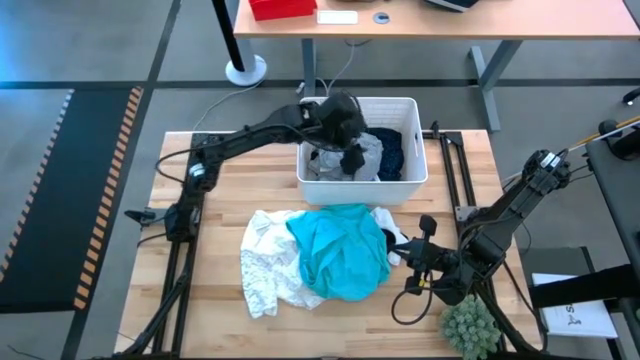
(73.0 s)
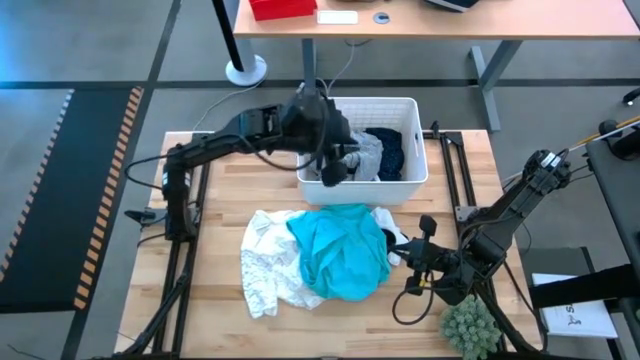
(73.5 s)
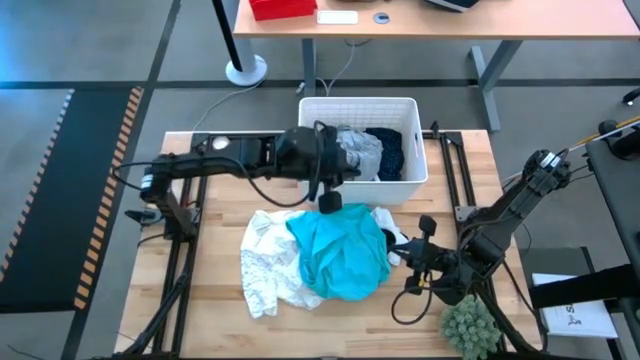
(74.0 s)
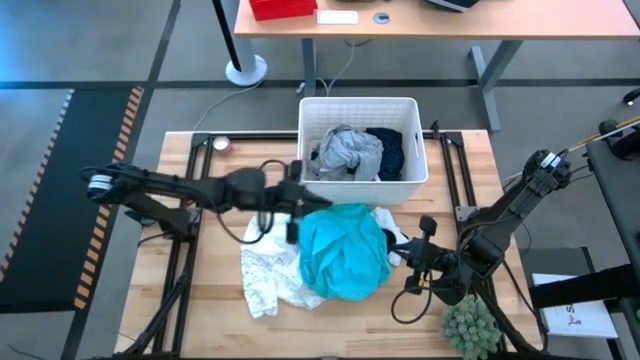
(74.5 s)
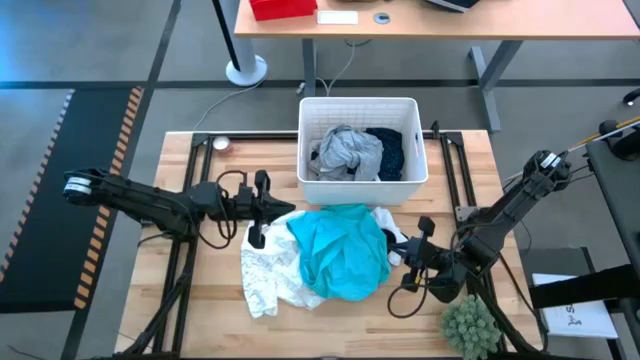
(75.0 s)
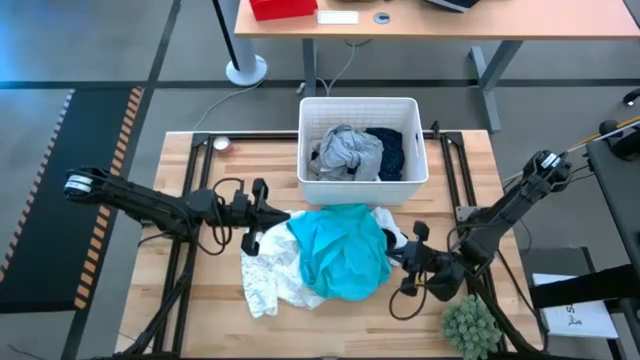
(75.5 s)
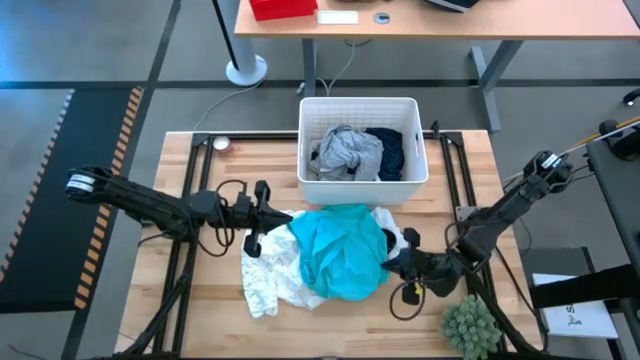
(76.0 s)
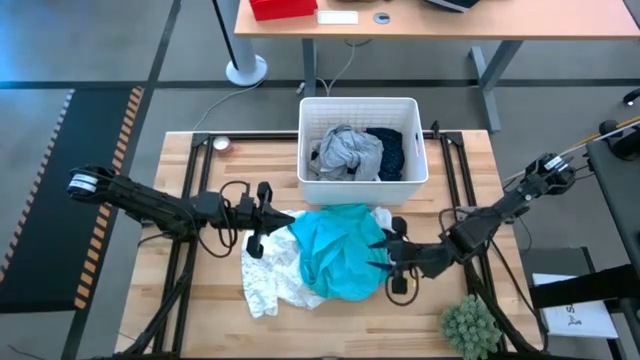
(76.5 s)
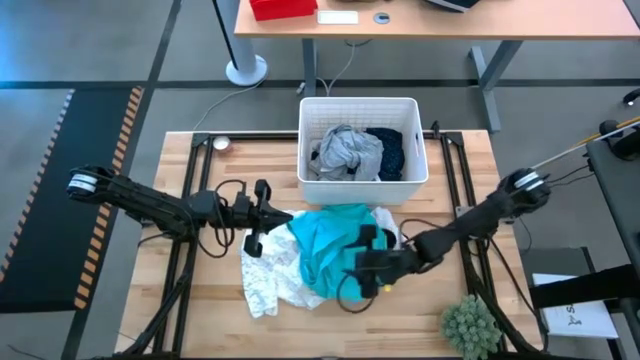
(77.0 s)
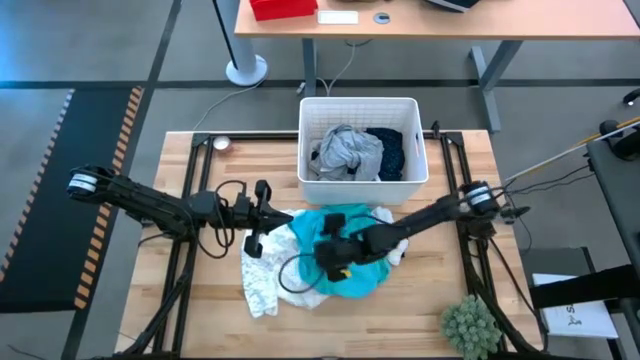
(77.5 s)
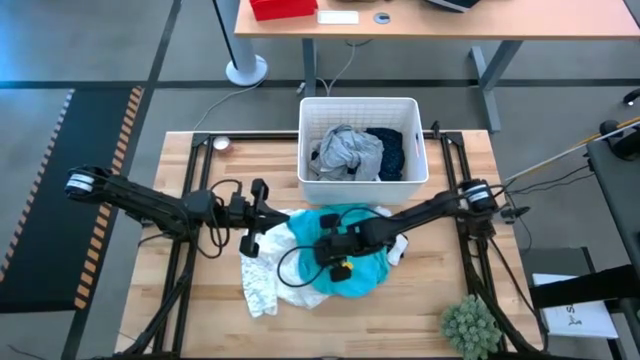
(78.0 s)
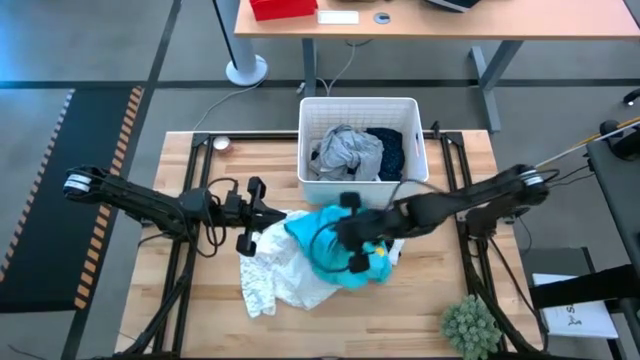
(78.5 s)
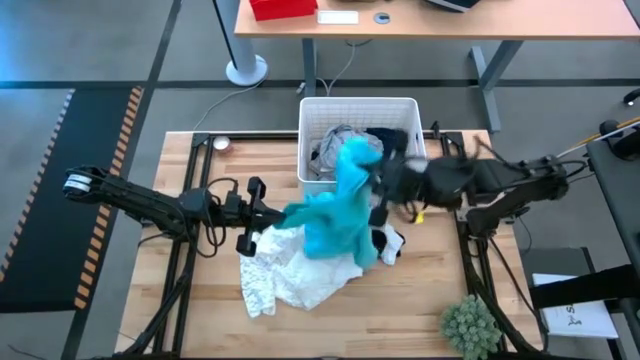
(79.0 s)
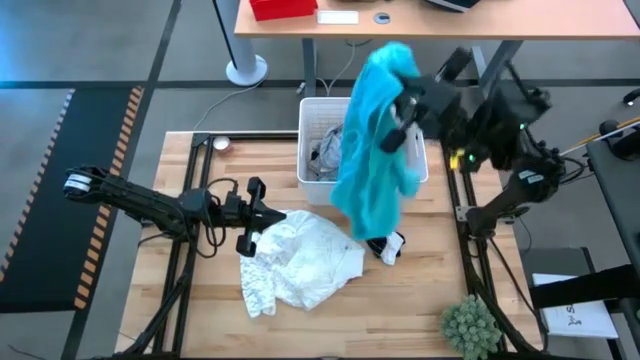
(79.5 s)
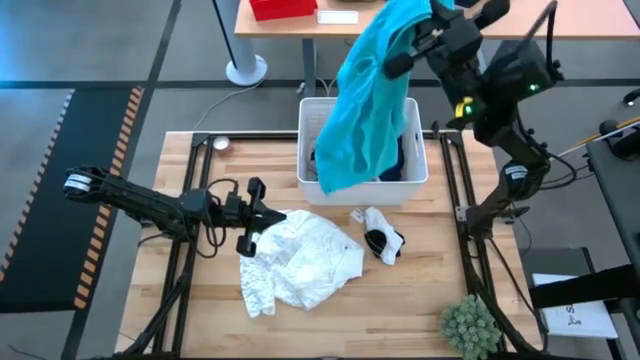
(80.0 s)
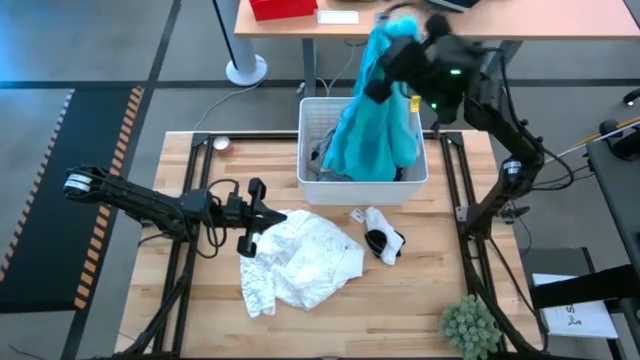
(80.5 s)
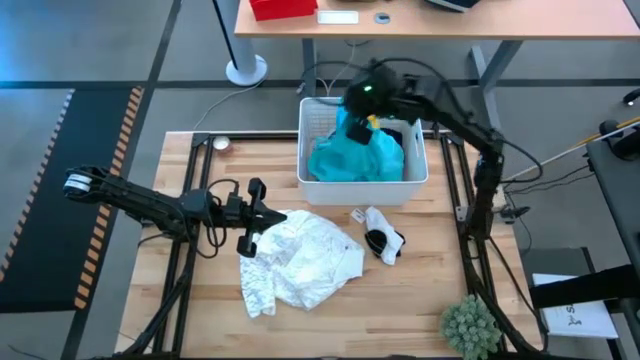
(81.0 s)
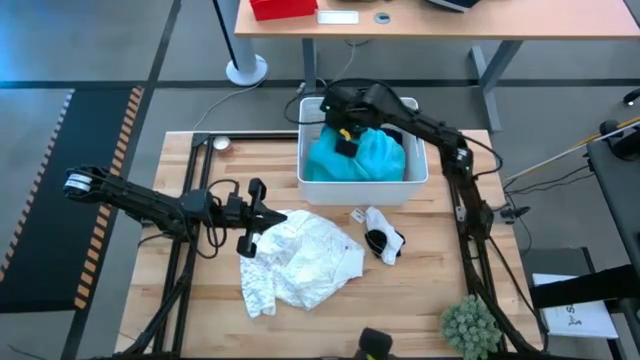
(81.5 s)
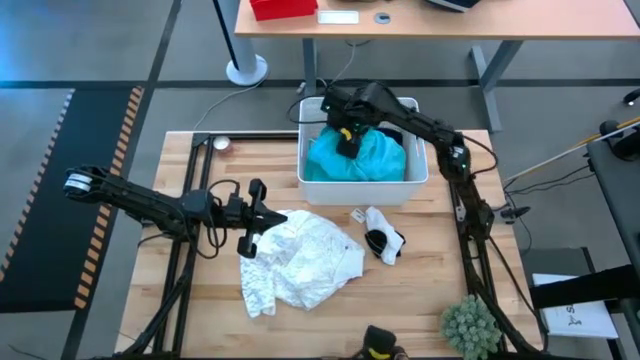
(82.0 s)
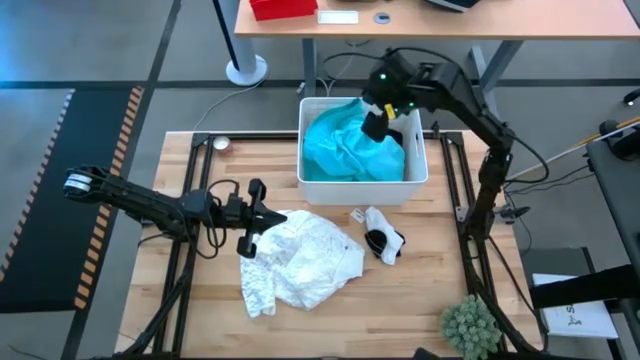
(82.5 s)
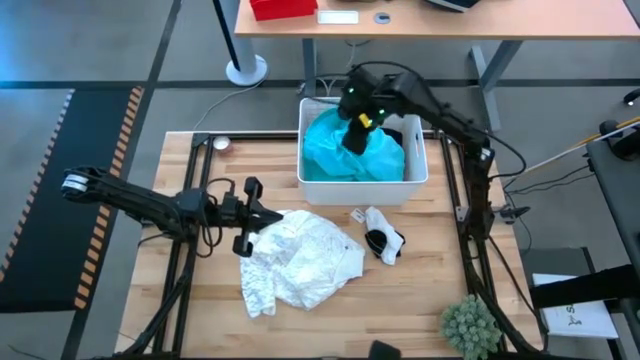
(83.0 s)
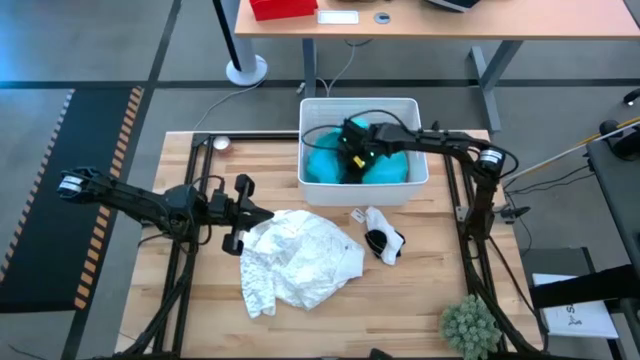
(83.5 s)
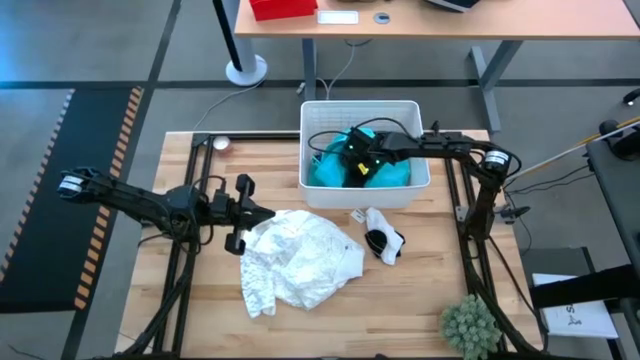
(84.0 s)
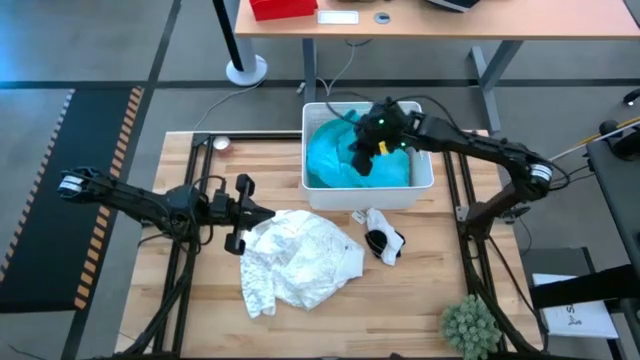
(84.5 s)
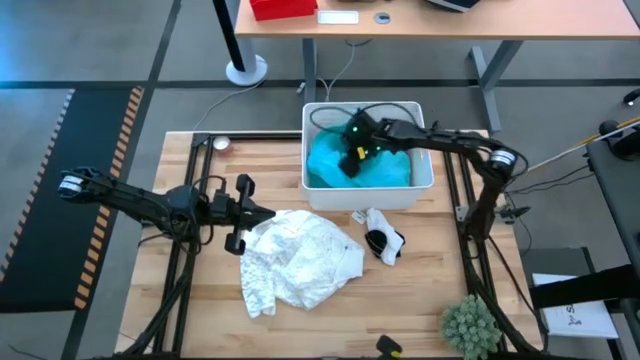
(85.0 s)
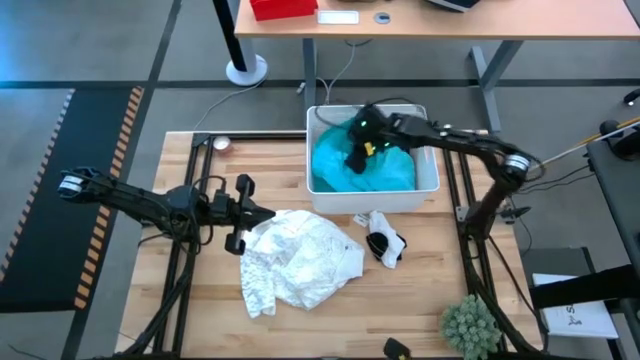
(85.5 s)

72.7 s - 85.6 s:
Task: Sort clothes
Put the blue shorts into the white laundry bin

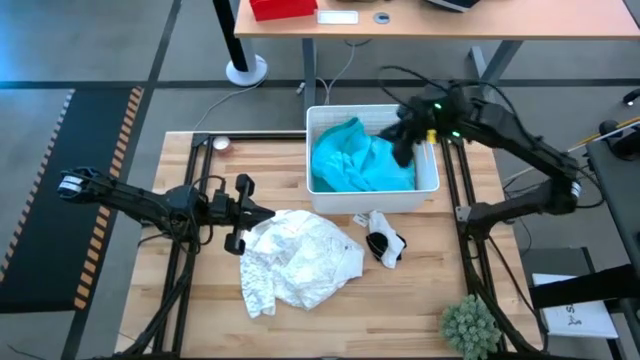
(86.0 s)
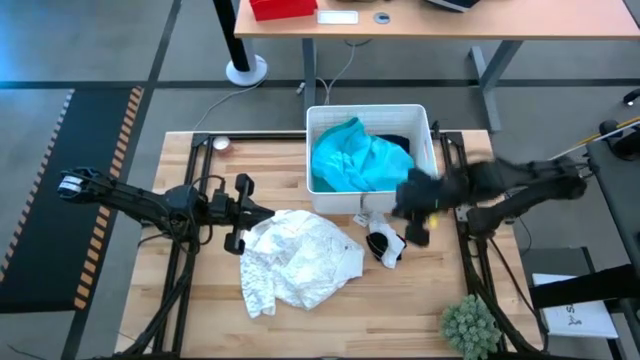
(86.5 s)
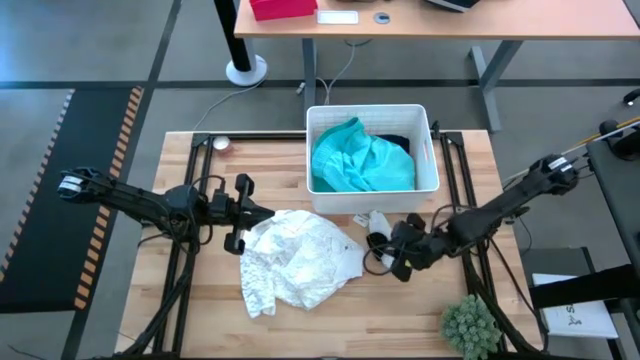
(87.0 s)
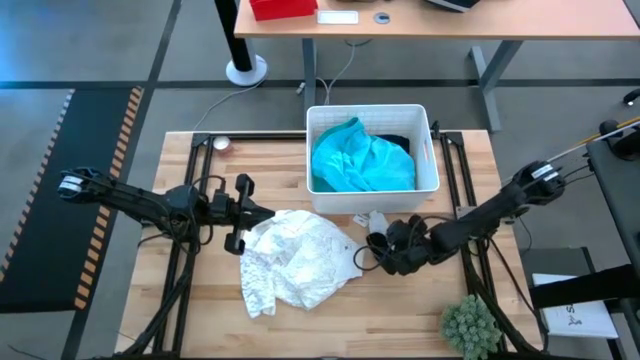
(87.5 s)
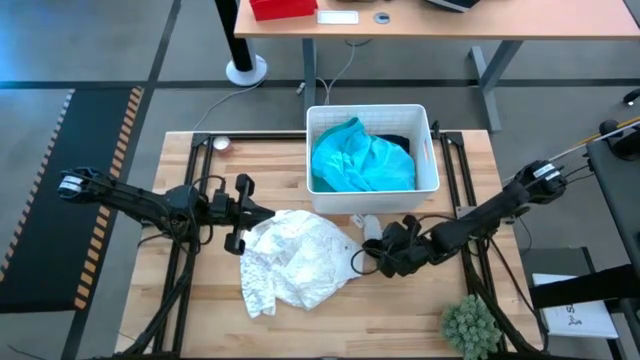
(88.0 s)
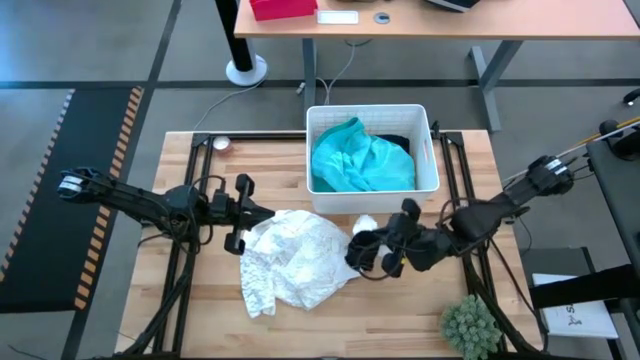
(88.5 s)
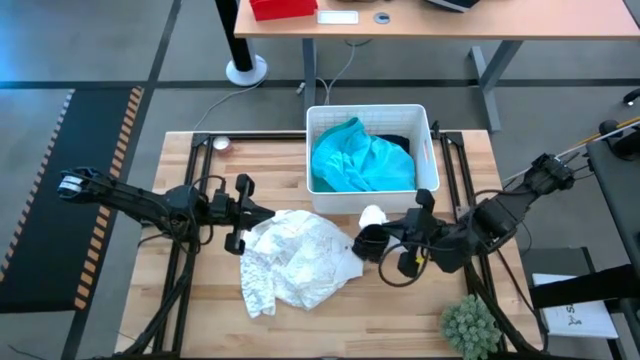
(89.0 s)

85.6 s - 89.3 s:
Put the black sock into the white laundry bin

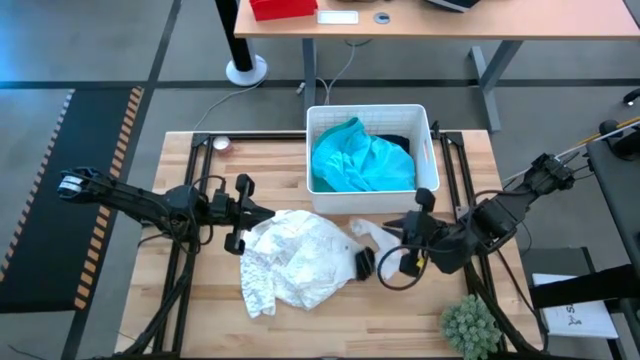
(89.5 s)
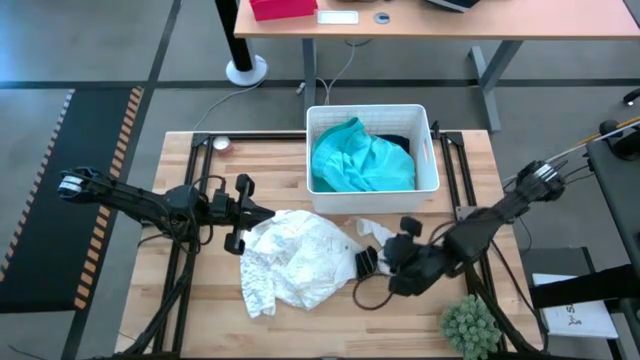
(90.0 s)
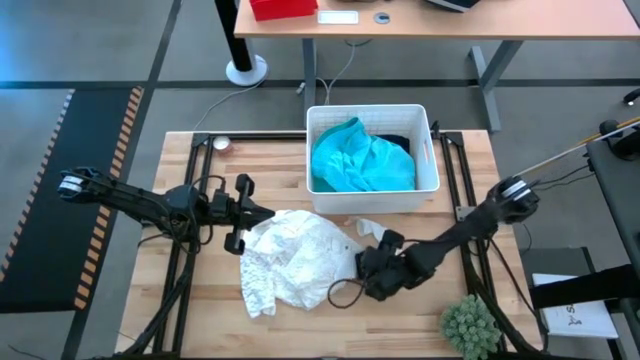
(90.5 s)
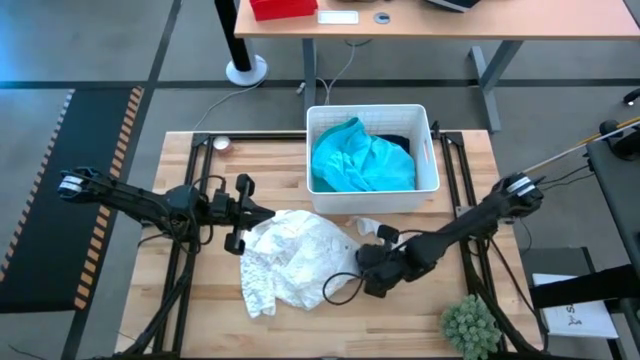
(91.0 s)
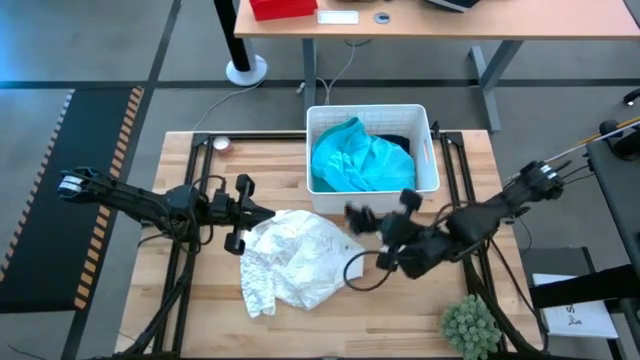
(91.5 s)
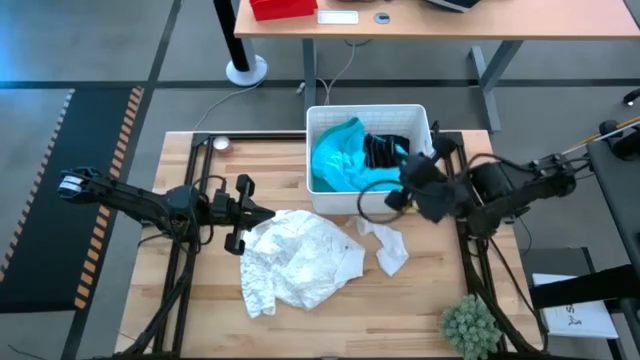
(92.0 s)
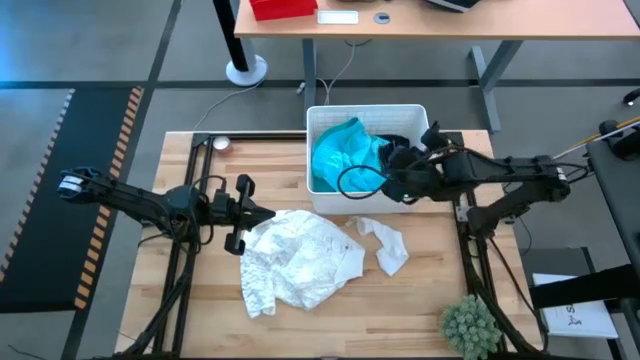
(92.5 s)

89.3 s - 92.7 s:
Put the black sock into the white laundry bin

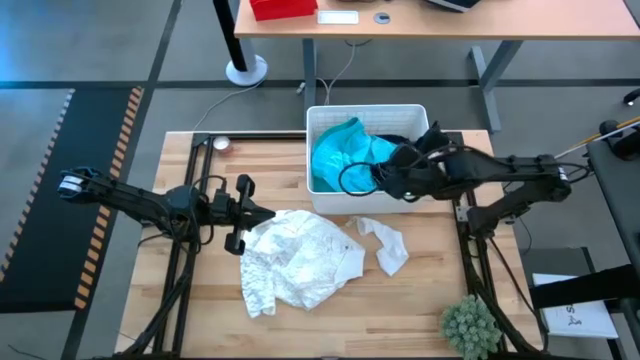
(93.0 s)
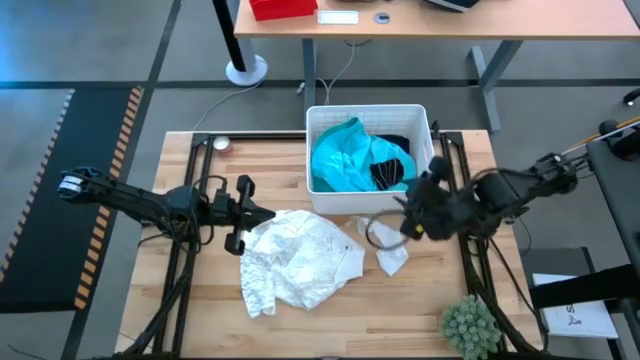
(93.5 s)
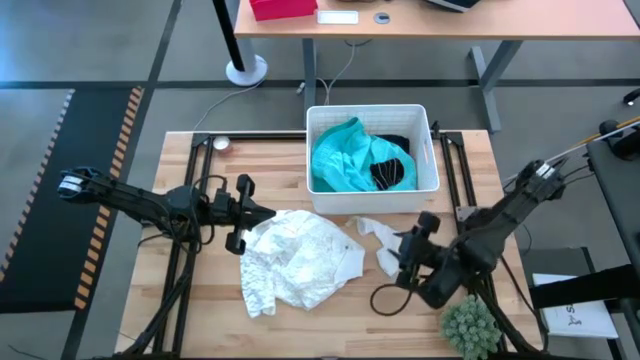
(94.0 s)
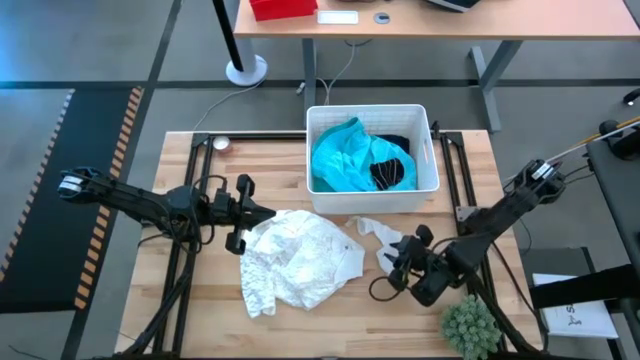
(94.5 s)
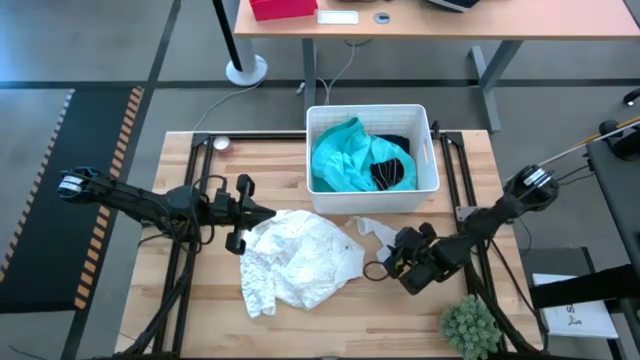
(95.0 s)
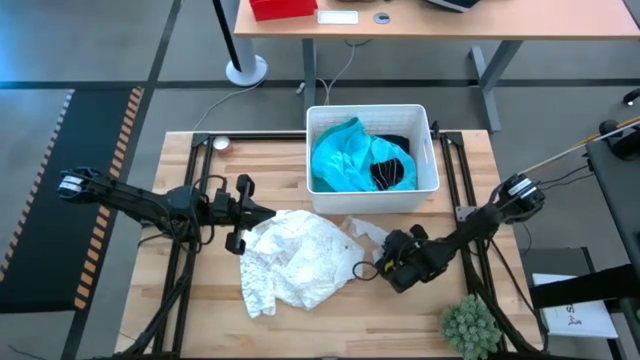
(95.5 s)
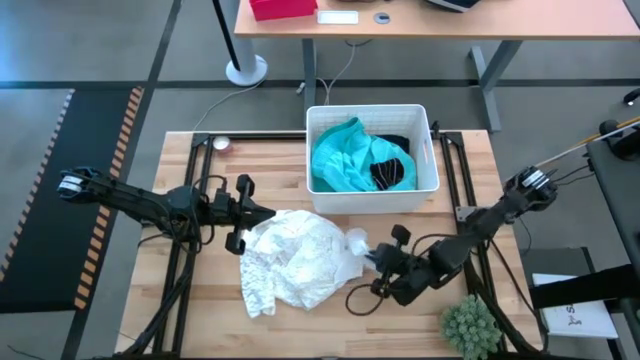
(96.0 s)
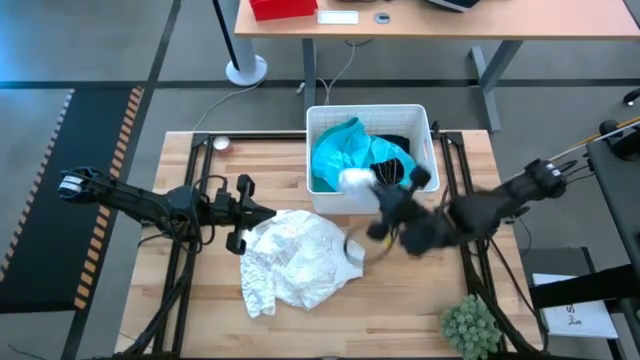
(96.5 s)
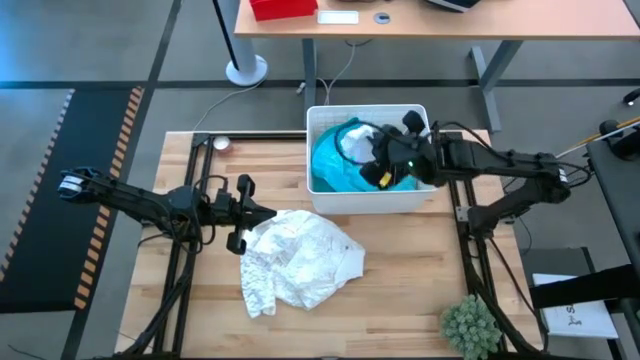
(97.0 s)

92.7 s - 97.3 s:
Put the white sock into the white laundry bin
